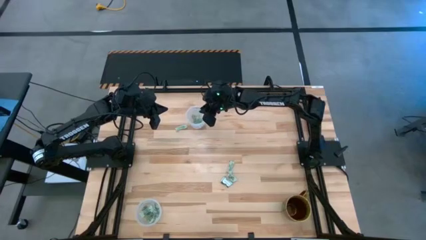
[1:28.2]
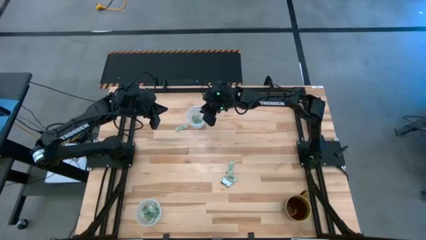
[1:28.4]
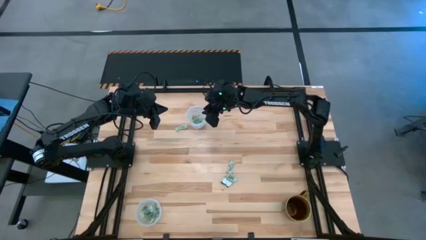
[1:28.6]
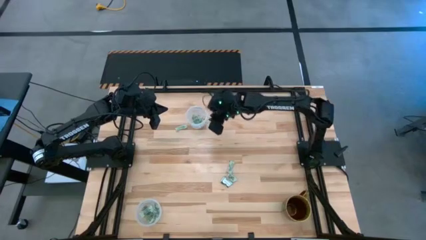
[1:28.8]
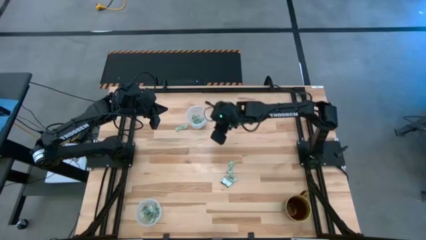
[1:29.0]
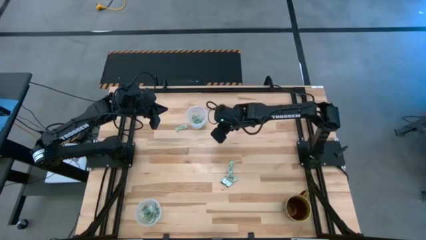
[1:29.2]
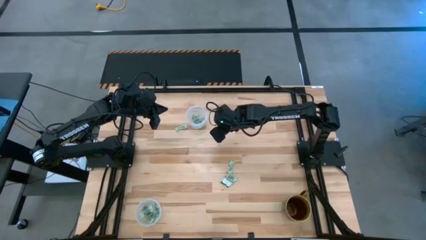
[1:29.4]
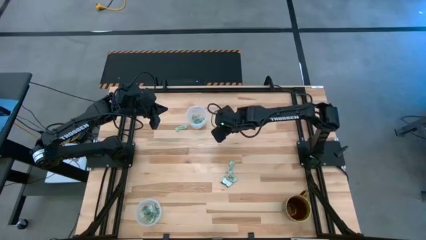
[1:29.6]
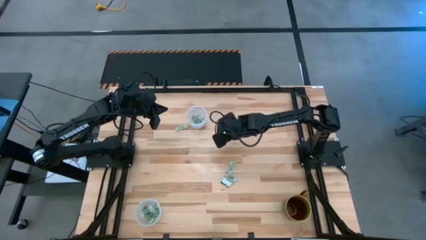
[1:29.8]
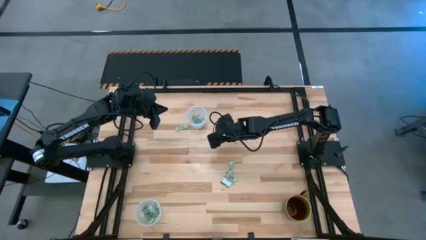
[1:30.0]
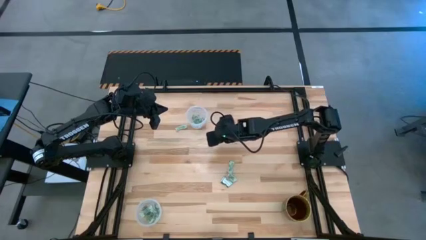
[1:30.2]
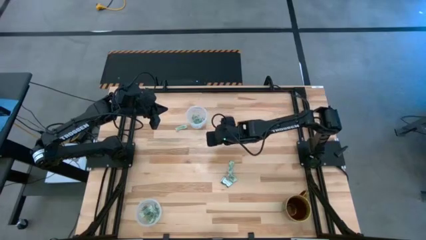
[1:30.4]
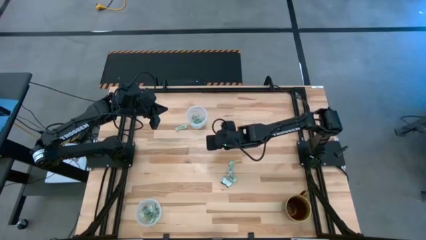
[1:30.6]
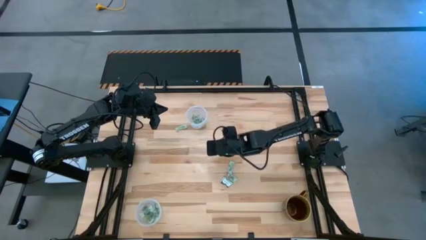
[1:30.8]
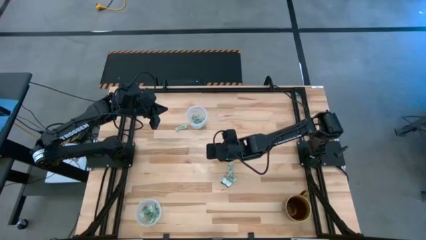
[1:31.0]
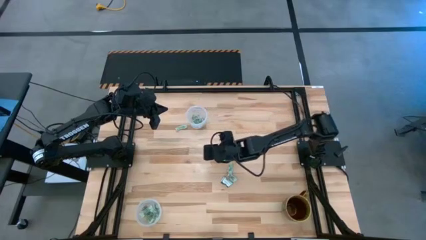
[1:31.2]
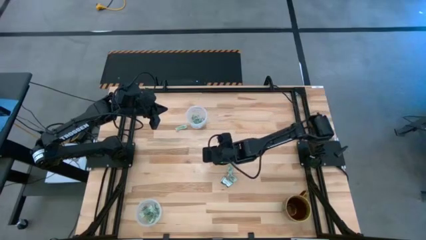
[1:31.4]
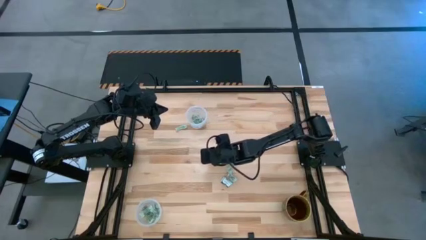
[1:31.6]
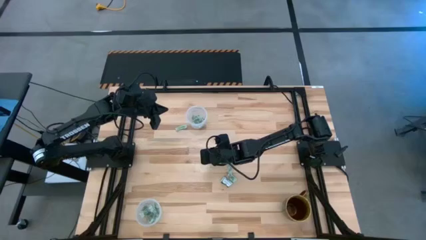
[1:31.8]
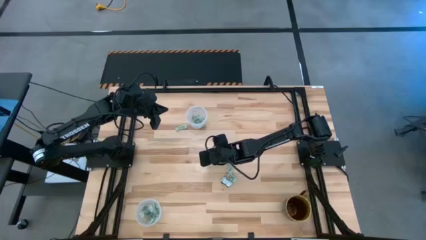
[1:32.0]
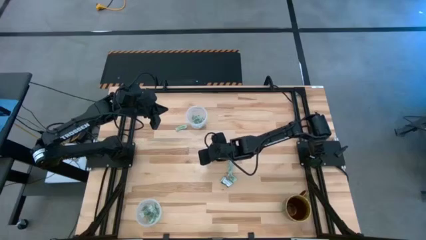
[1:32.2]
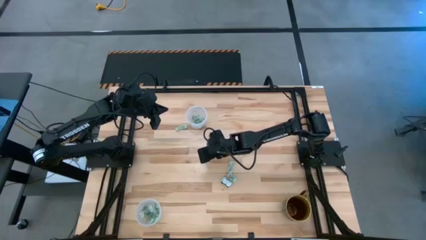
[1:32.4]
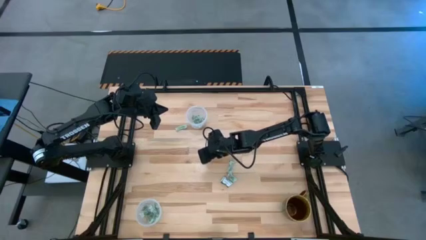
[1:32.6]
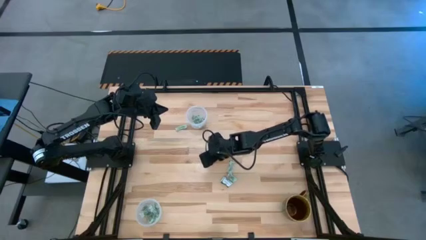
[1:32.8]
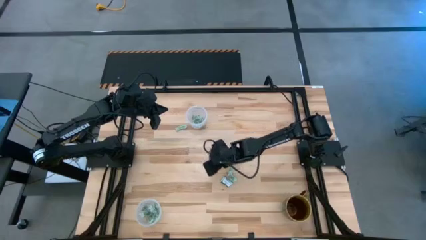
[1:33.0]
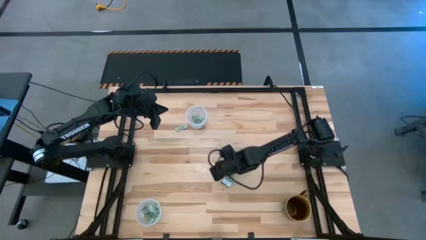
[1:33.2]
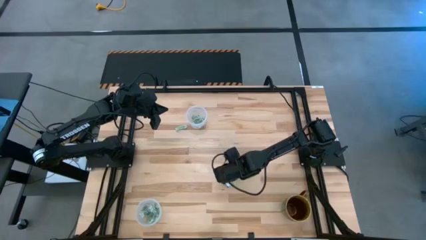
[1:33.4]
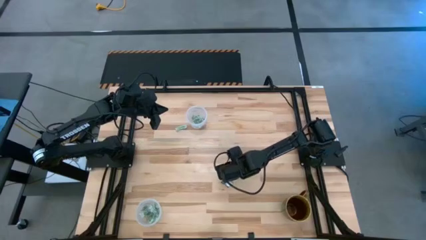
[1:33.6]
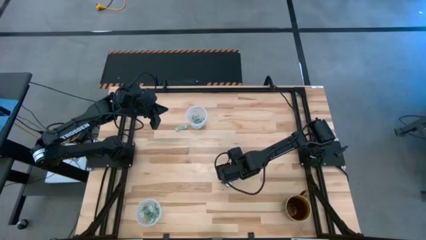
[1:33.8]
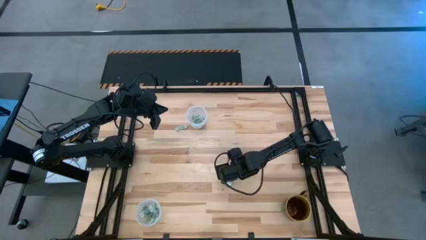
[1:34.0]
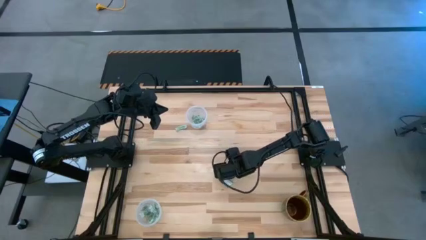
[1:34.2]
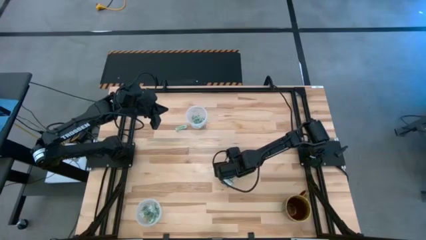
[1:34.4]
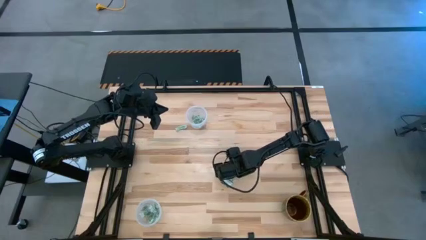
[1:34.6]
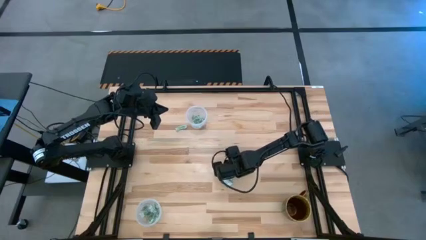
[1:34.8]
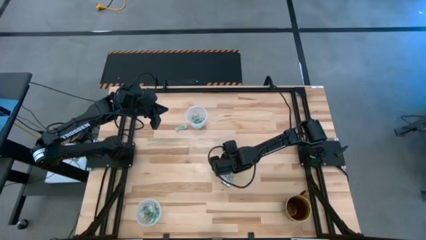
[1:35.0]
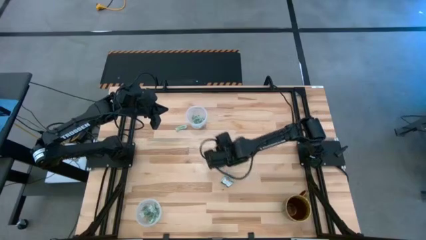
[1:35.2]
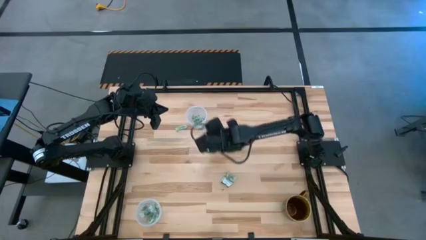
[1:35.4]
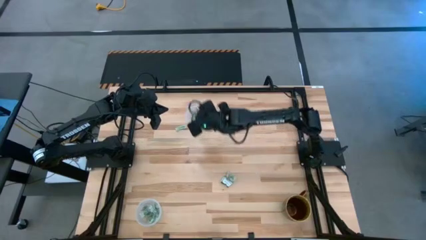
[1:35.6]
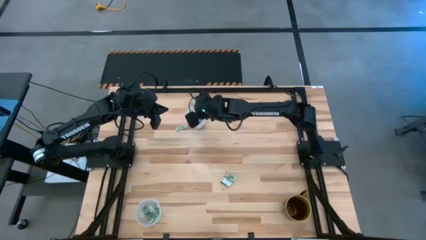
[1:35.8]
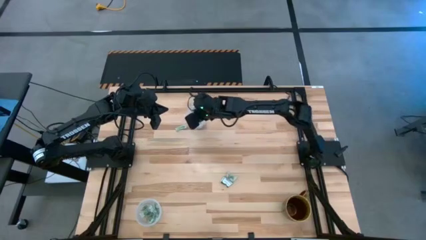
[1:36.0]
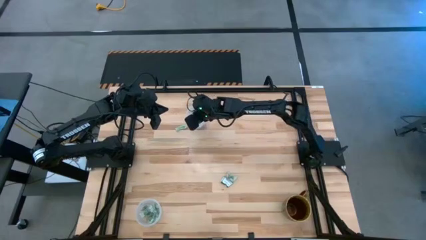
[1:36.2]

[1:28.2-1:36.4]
Task: Pick and place Stevia / Truvia into bins
Put the stevia packet into the top transparent container

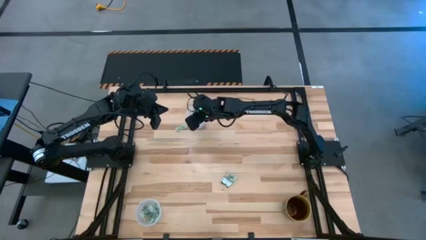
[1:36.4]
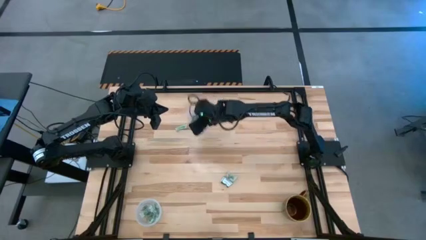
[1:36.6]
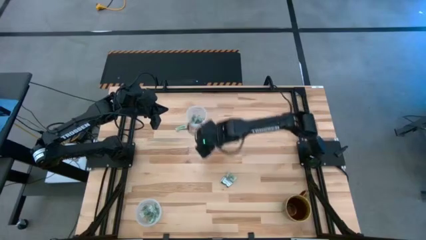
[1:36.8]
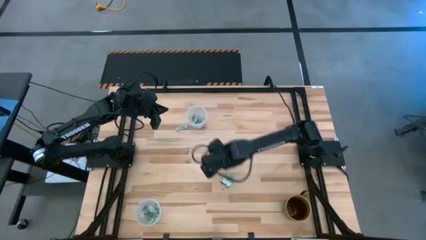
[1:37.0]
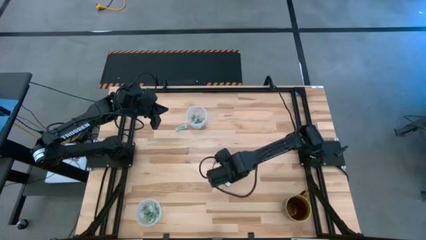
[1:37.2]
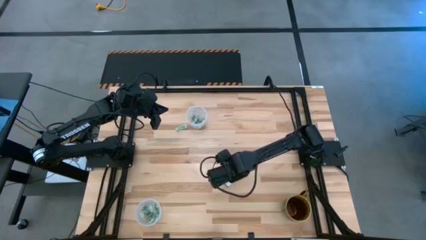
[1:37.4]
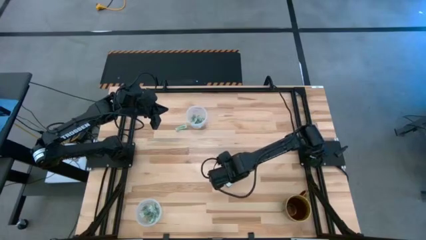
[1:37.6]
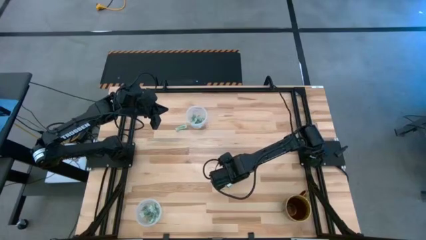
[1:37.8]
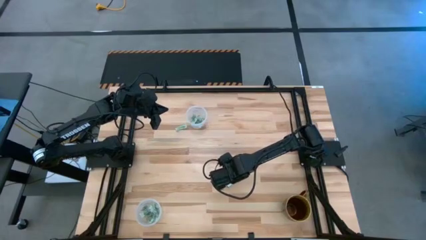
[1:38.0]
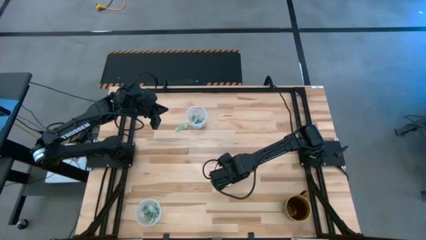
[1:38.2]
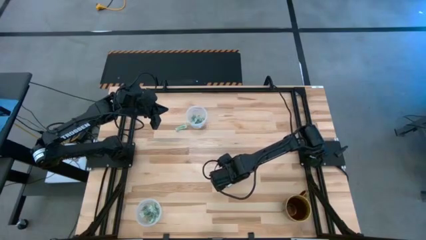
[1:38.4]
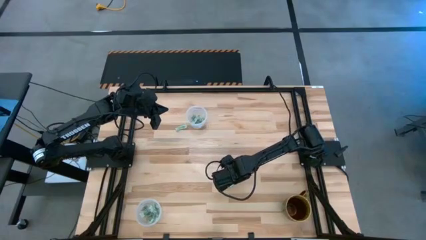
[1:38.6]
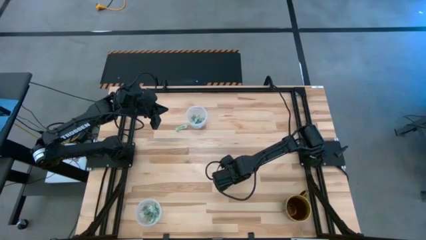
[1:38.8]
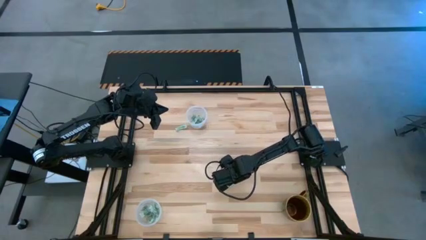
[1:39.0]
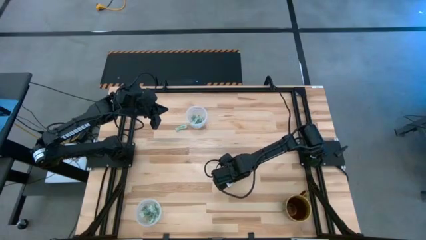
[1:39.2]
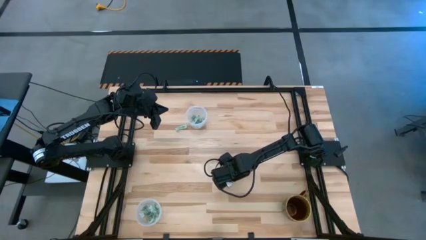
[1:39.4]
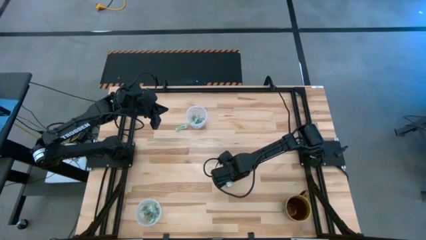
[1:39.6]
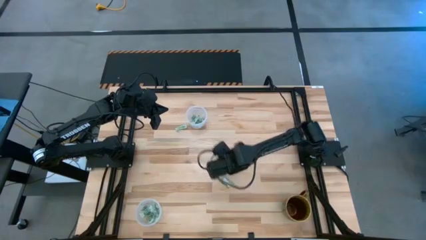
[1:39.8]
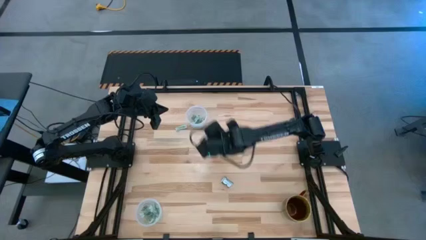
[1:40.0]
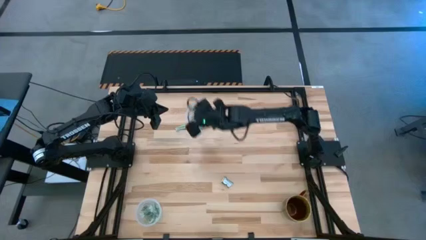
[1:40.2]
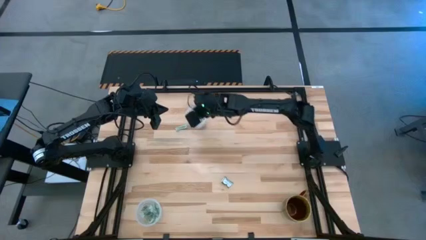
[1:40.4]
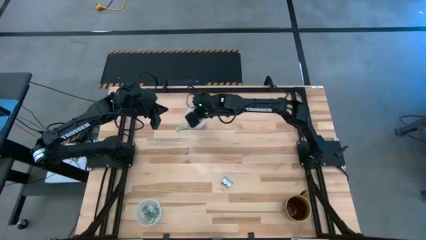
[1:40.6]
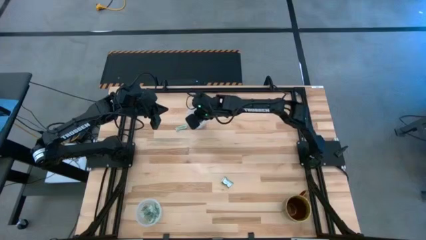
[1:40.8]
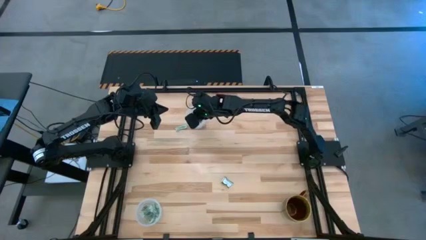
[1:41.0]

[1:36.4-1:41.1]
Put the stevia packet into the top transparent container

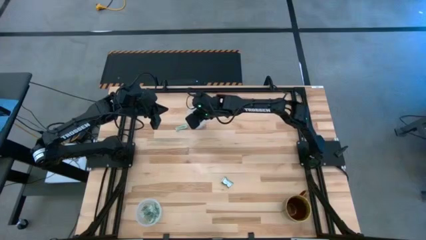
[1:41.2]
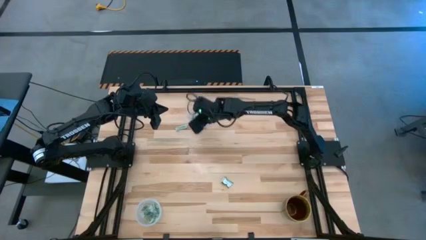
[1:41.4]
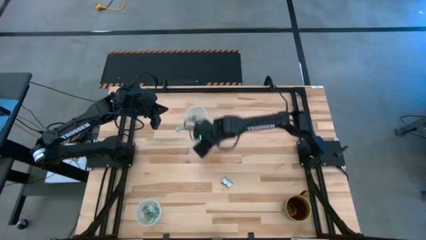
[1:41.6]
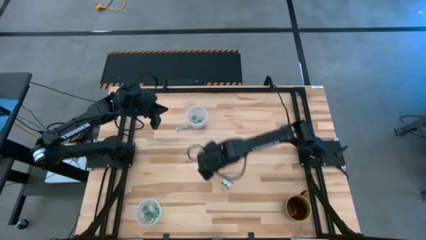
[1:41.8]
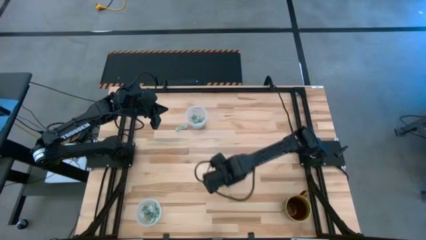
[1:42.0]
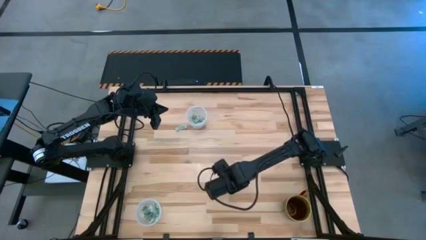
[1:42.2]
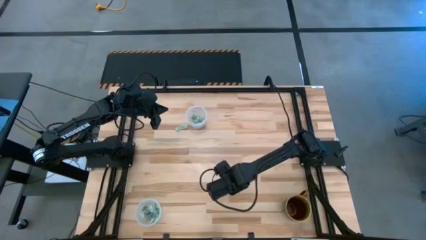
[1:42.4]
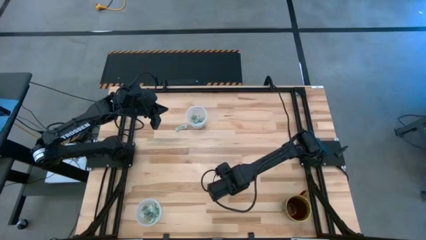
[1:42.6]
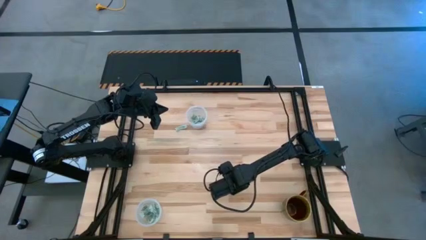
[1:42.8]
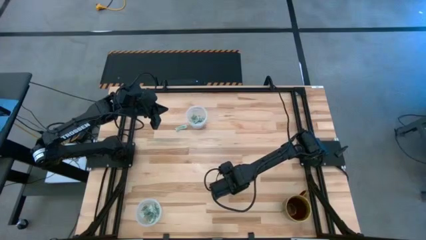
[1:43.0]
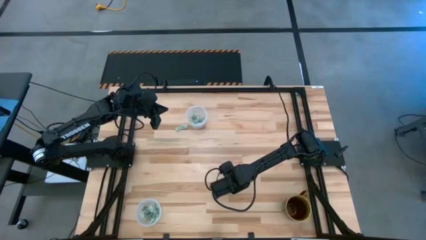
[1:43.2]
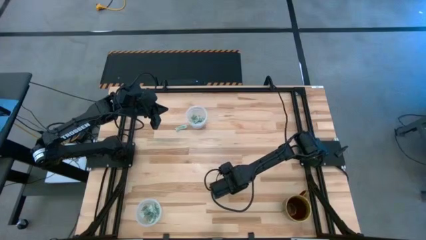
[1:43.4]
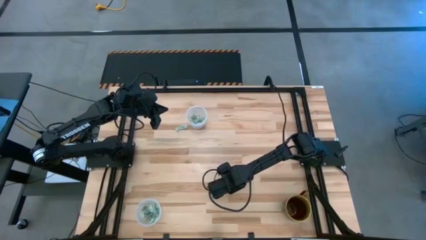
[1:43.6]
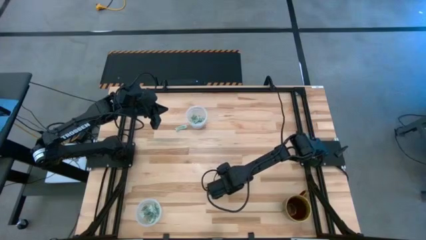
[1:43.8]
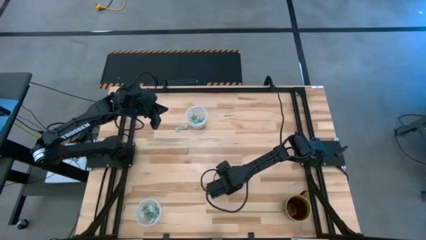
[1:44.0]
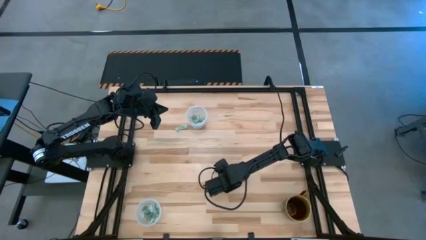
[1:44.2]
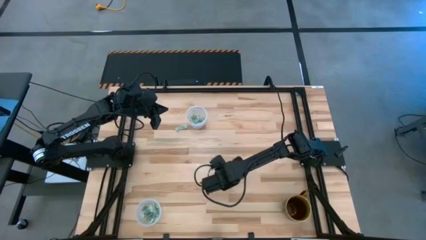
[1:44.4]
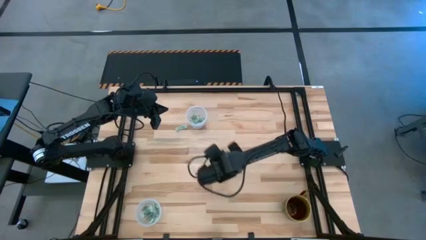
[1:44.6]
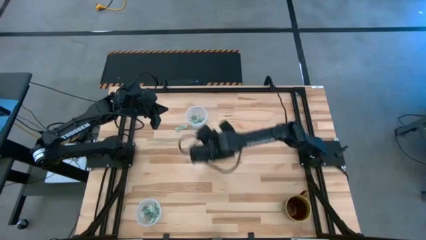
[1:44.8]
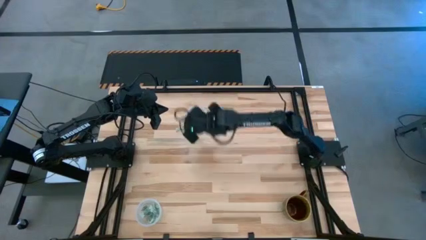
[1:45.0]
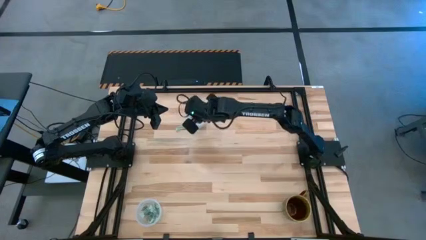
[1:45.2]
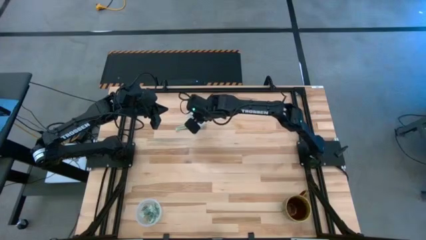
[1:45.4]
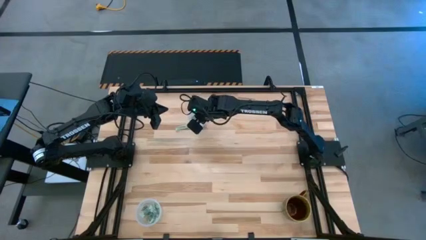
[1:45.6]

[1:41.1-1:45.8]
Put the truvia packet into the top transparent container
